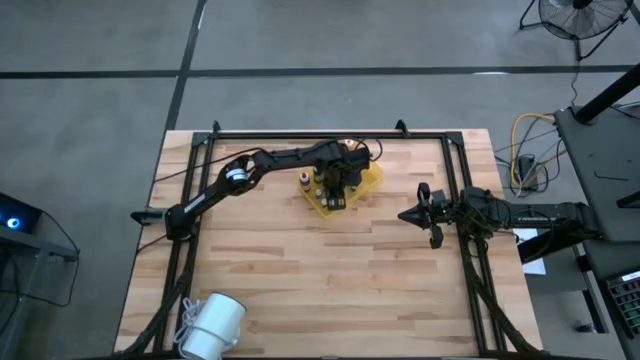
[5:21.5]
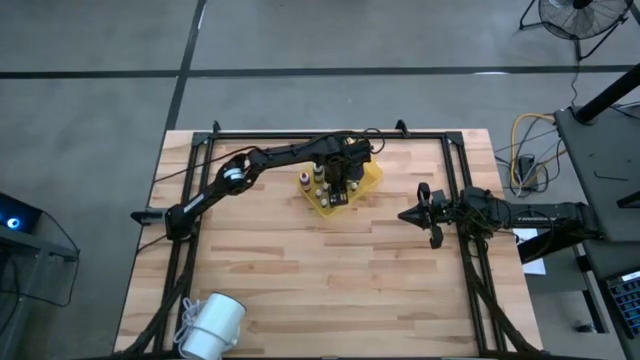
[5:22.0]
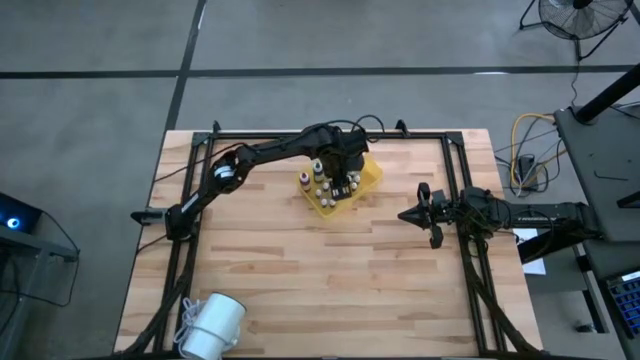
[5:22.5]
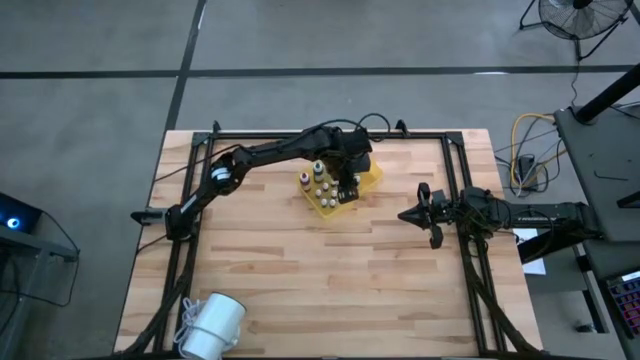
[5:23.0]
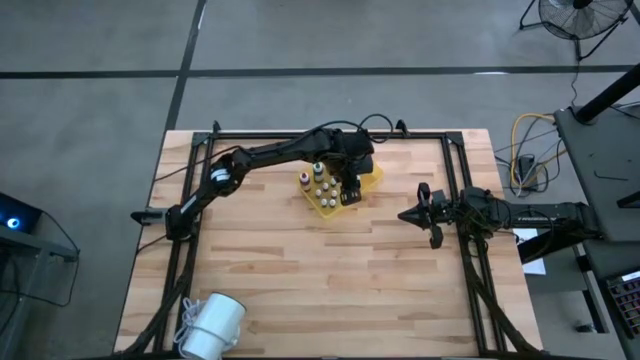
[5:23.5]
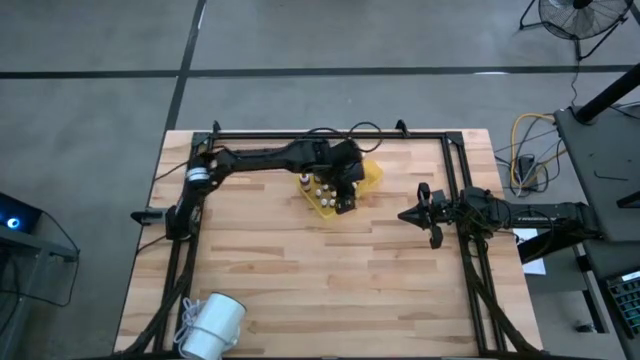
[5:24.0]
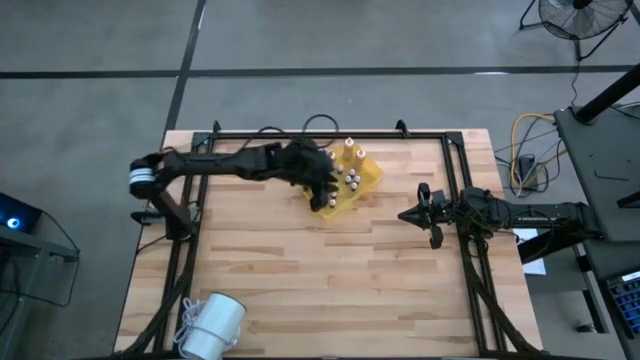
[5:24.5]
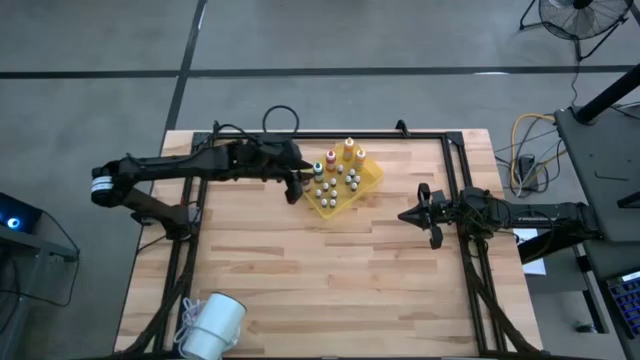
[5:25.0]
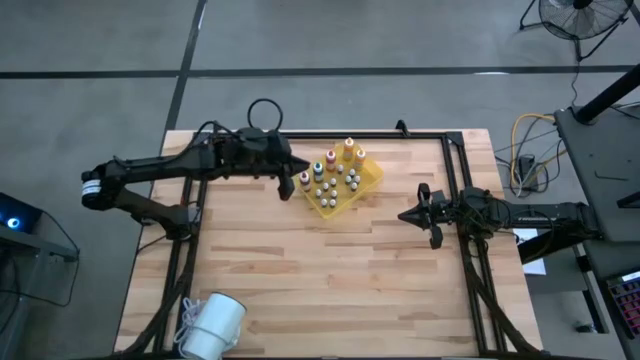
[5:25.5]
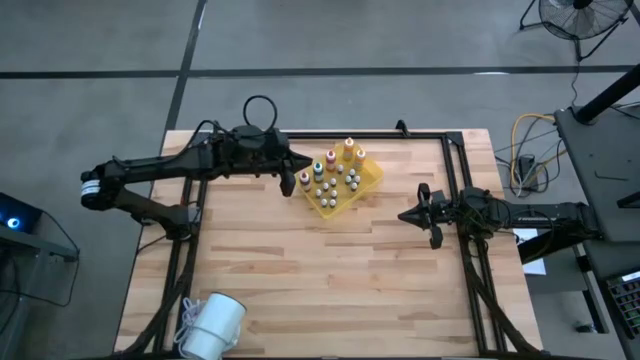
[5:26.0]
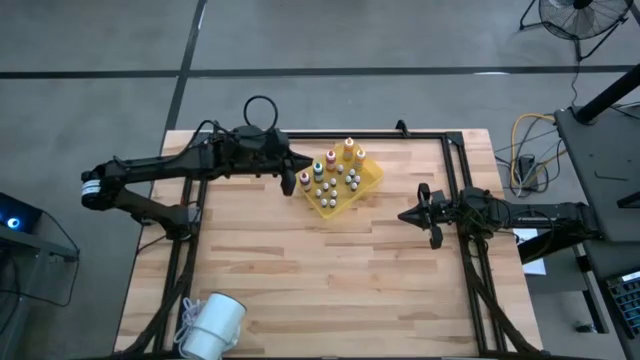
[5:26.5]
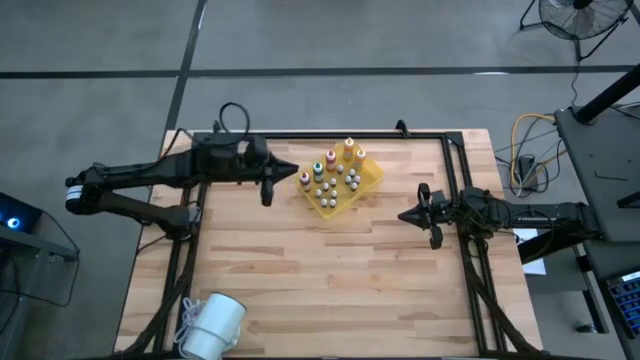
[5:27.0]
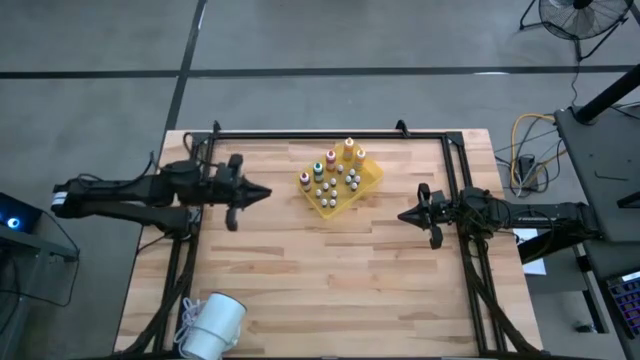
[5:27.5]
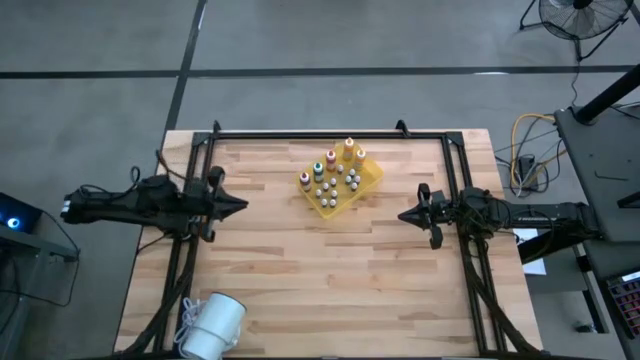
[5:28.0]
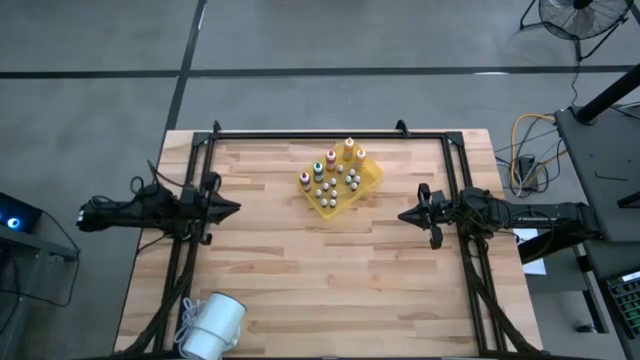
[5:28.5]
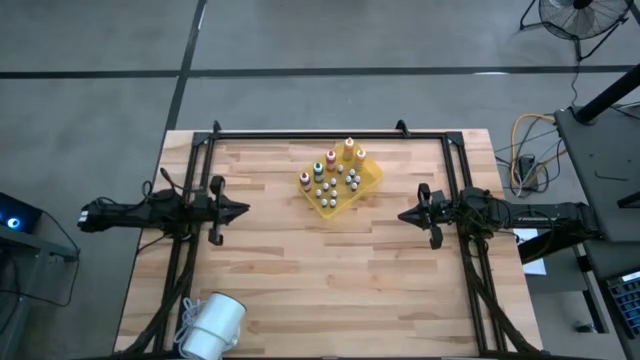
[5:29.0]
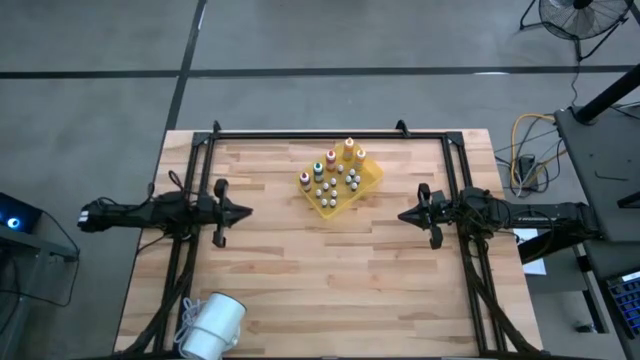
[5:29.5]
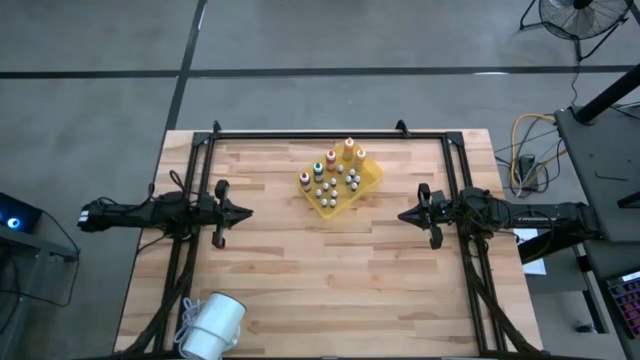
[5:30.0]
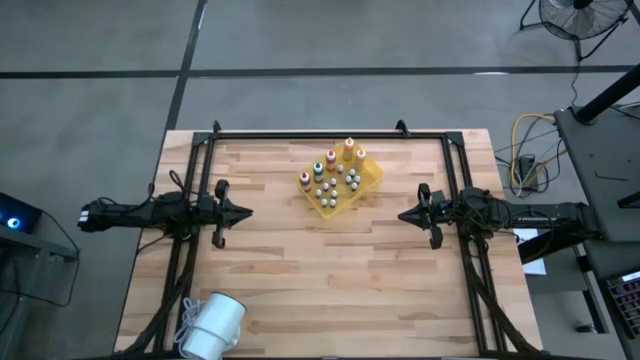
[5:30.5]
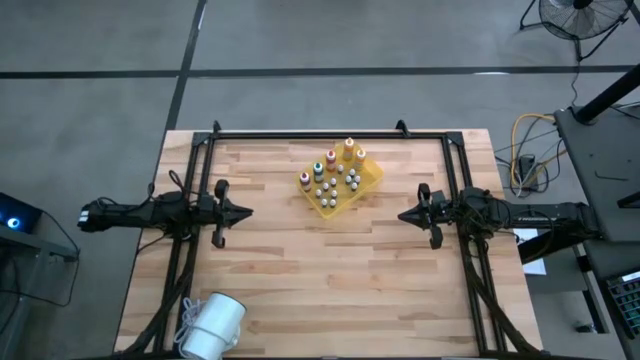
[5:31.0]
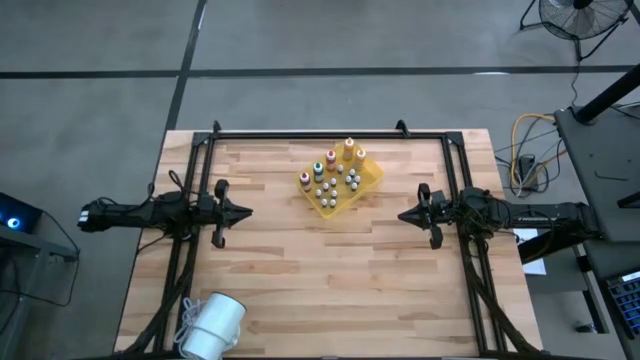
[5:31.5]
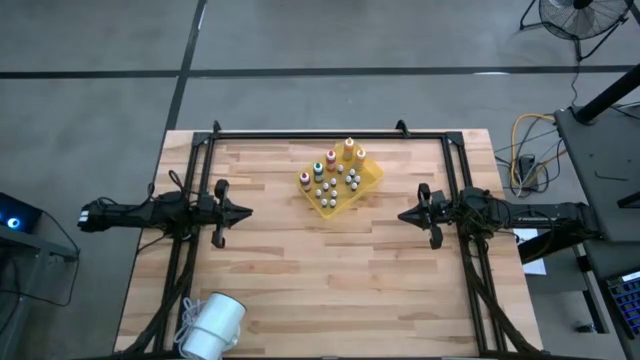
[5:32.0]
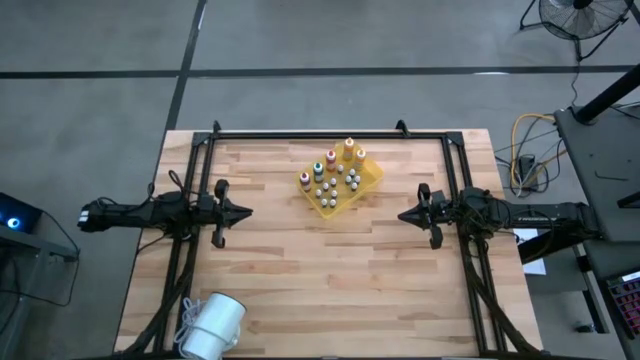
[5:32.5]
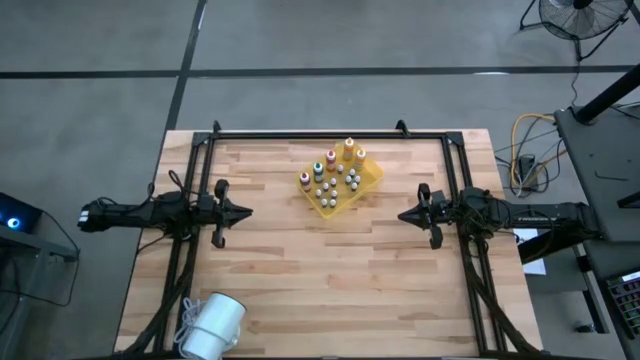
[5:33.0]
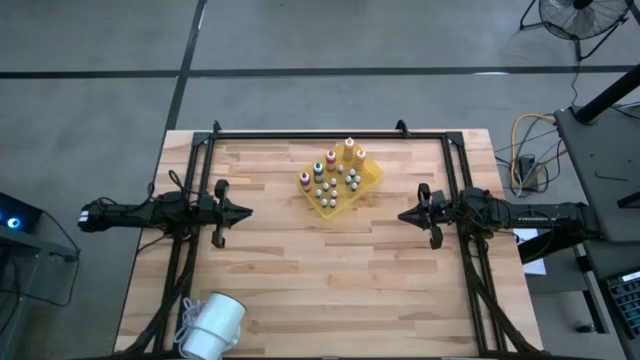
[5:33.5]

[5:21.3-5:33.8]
Task: Pick & Place food coloring
Return to Home Position
